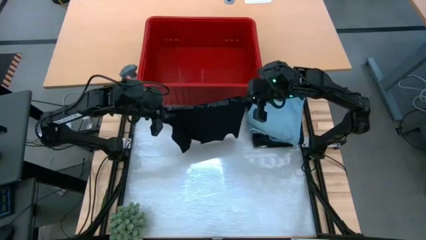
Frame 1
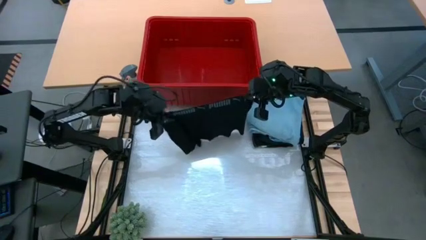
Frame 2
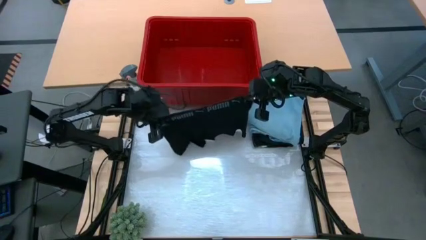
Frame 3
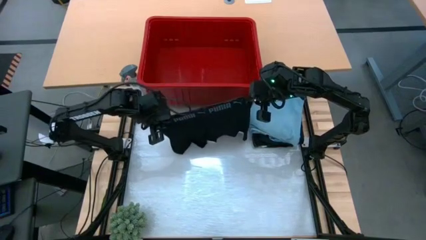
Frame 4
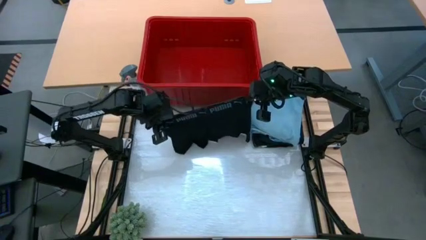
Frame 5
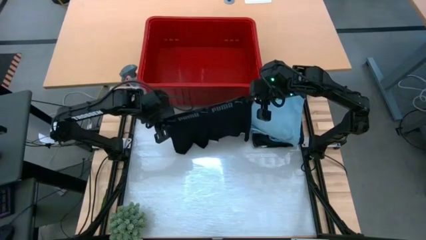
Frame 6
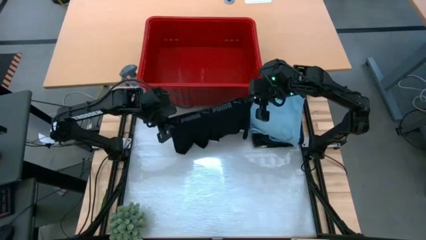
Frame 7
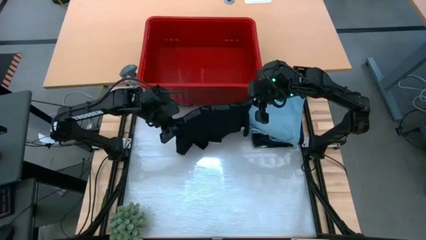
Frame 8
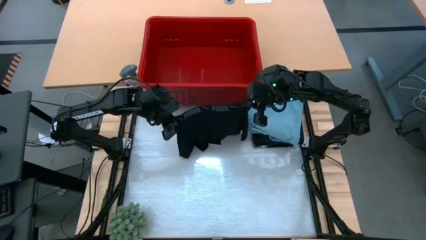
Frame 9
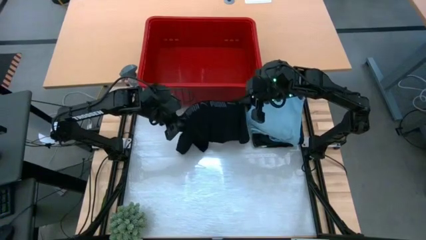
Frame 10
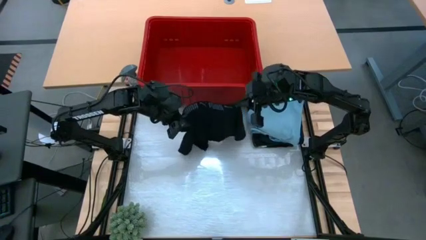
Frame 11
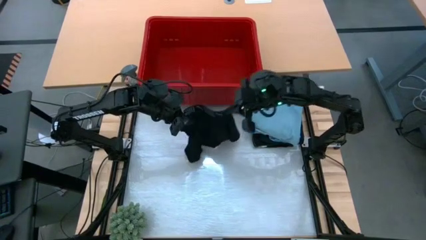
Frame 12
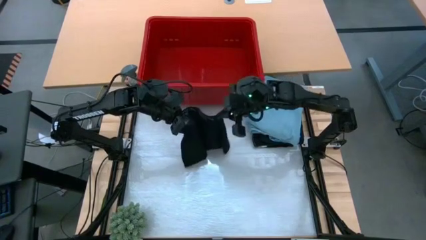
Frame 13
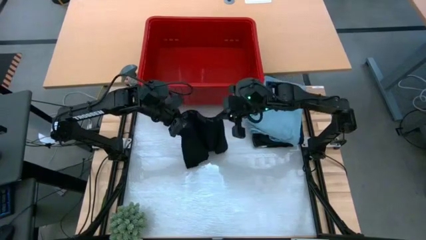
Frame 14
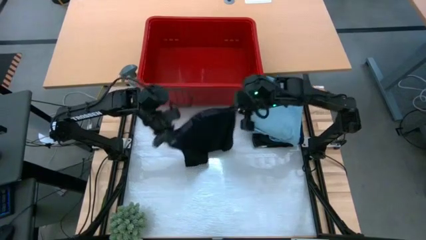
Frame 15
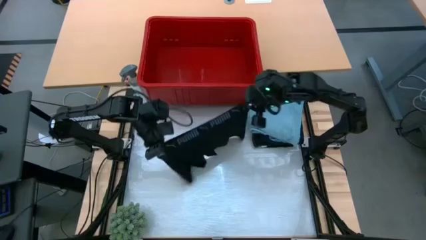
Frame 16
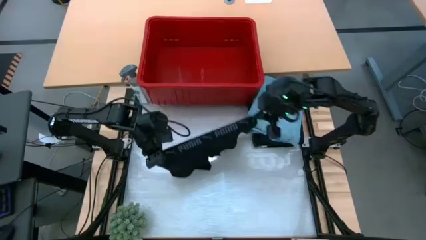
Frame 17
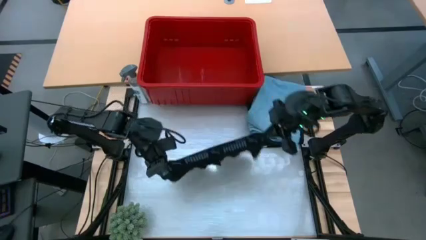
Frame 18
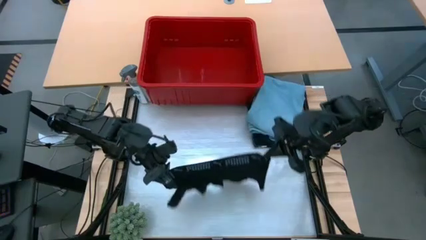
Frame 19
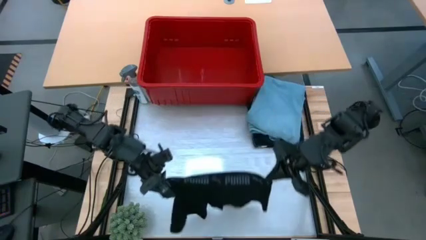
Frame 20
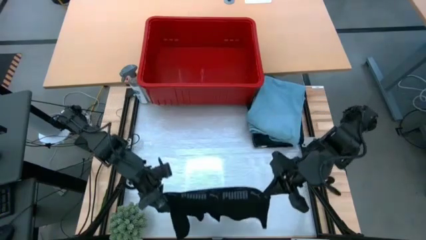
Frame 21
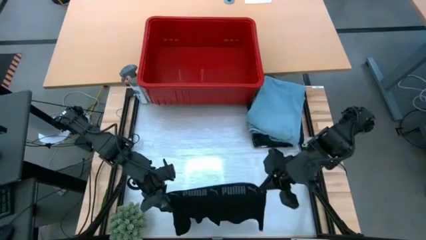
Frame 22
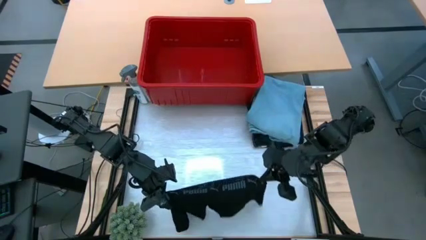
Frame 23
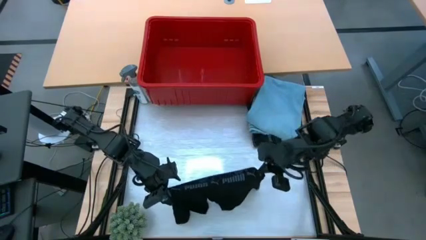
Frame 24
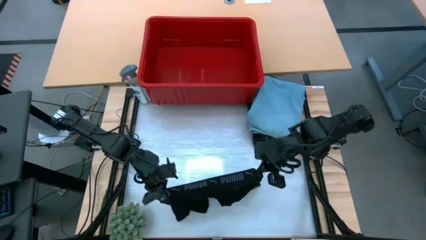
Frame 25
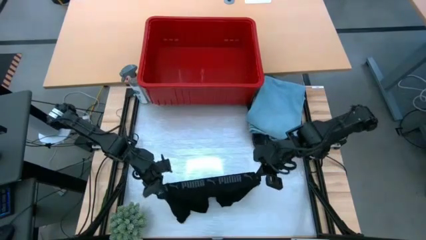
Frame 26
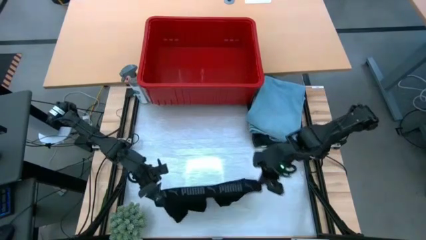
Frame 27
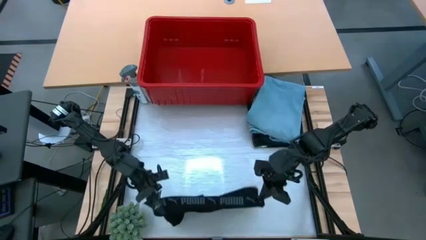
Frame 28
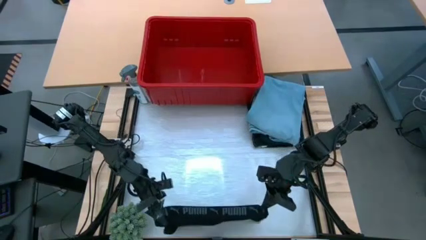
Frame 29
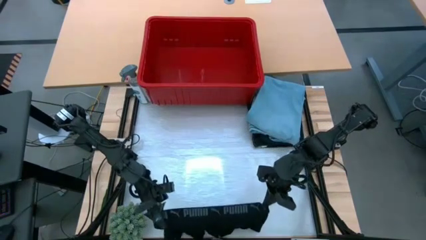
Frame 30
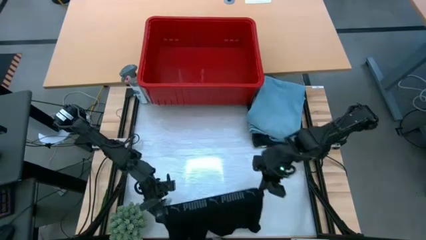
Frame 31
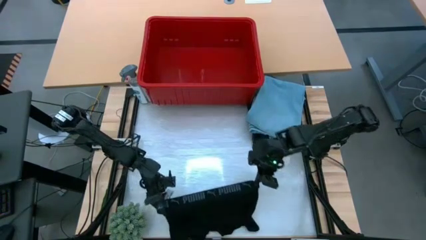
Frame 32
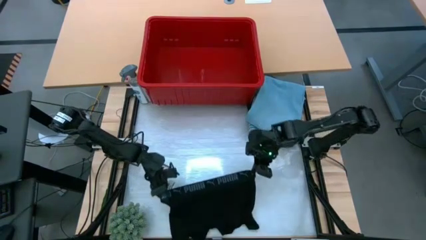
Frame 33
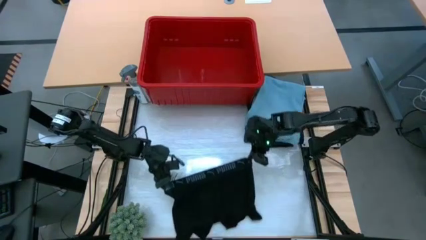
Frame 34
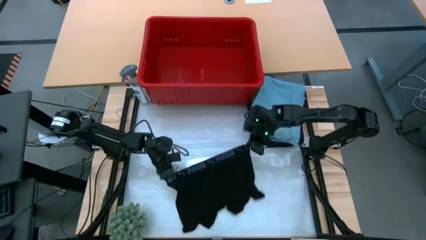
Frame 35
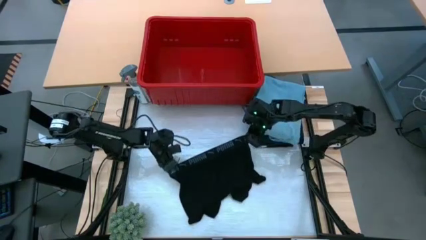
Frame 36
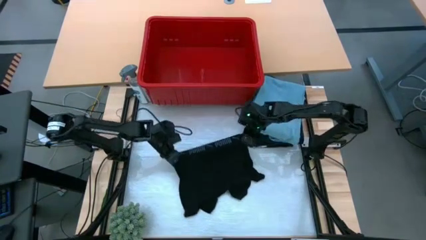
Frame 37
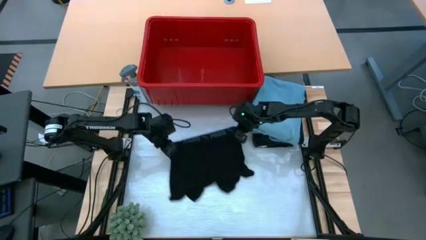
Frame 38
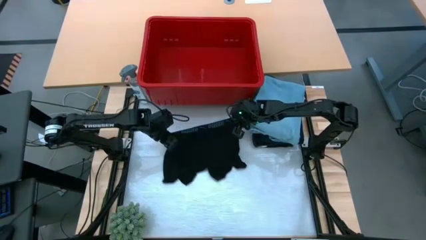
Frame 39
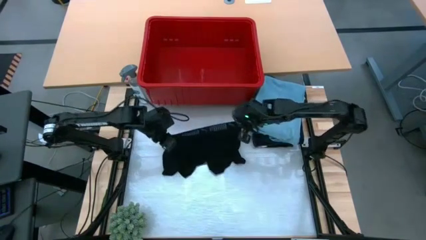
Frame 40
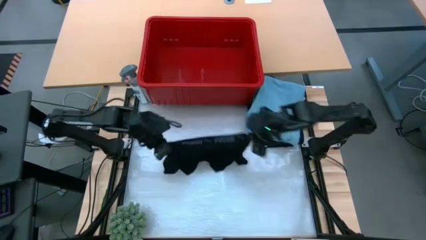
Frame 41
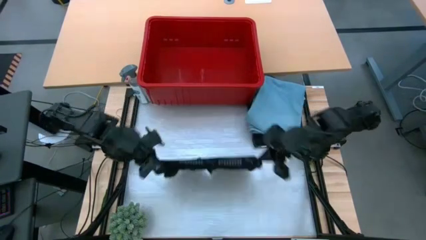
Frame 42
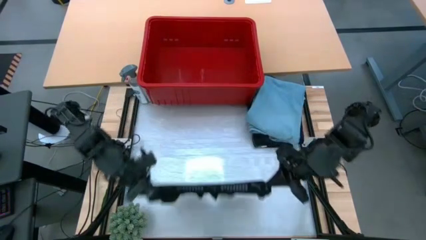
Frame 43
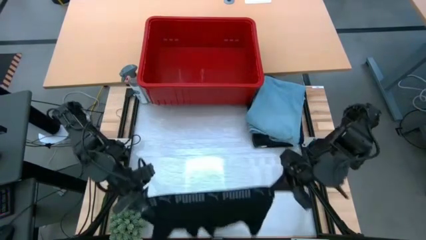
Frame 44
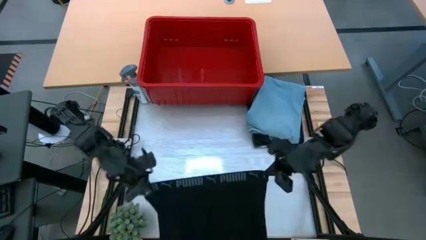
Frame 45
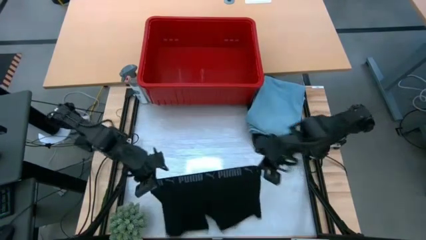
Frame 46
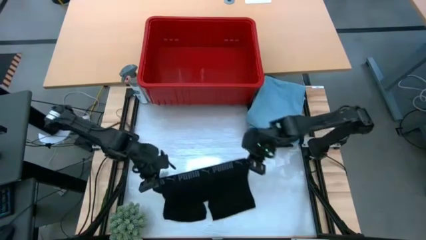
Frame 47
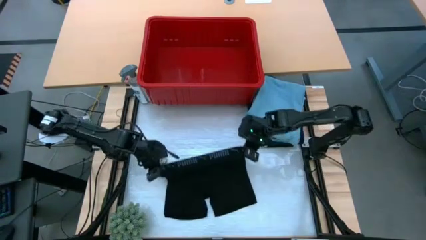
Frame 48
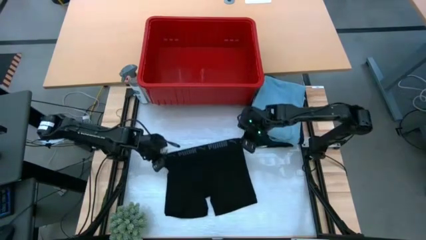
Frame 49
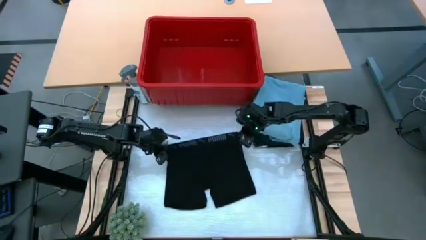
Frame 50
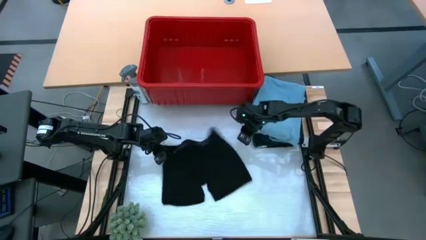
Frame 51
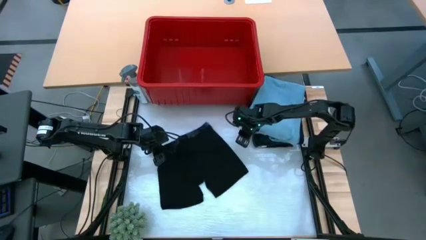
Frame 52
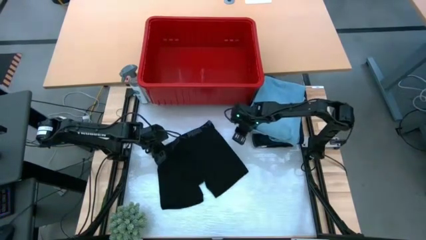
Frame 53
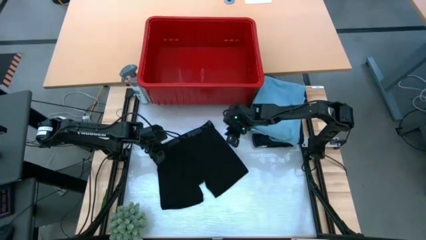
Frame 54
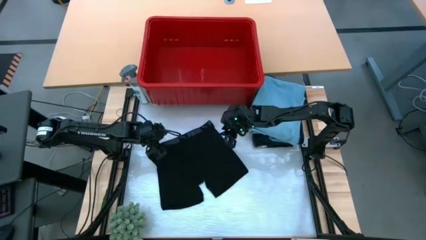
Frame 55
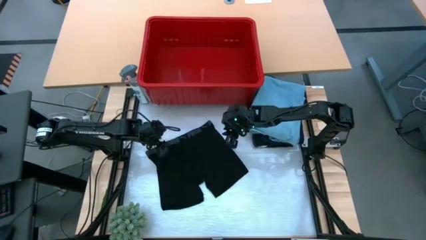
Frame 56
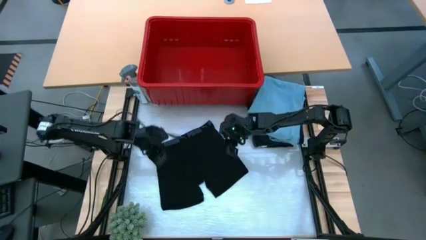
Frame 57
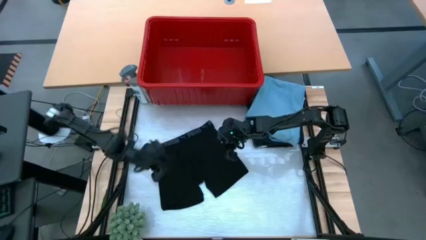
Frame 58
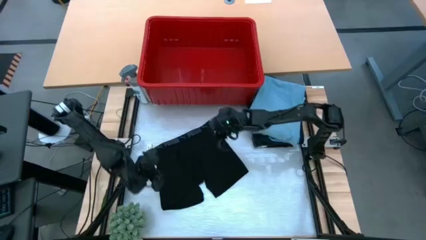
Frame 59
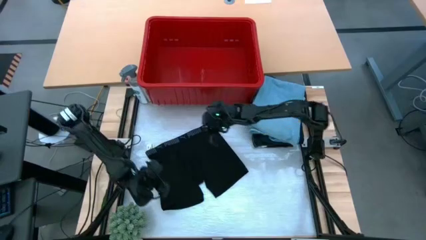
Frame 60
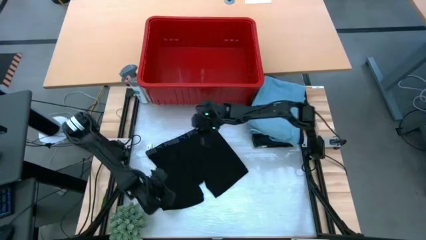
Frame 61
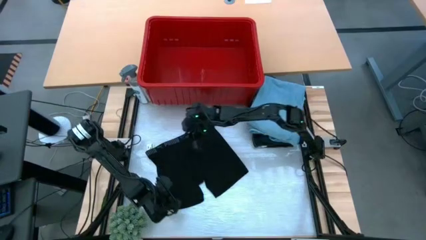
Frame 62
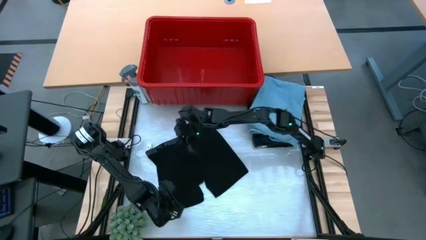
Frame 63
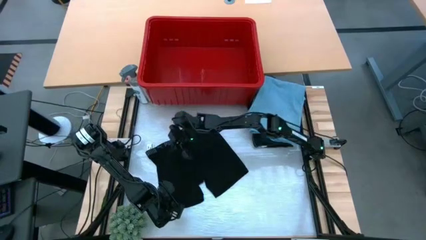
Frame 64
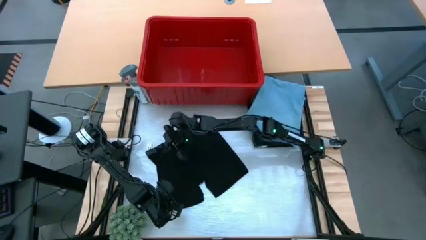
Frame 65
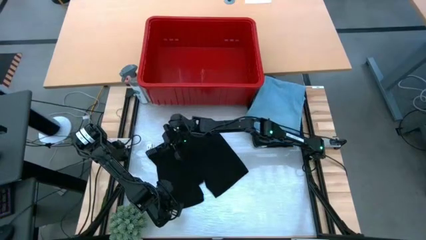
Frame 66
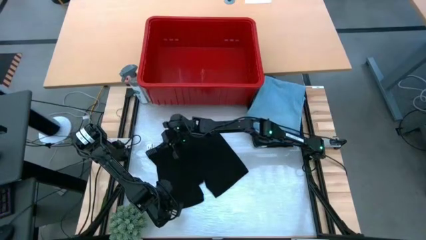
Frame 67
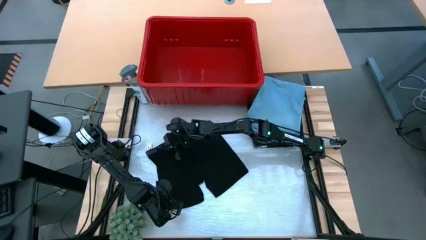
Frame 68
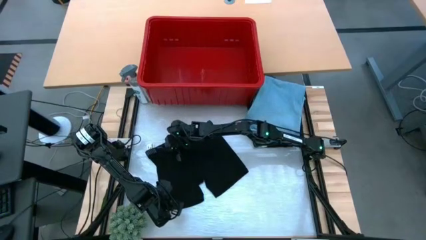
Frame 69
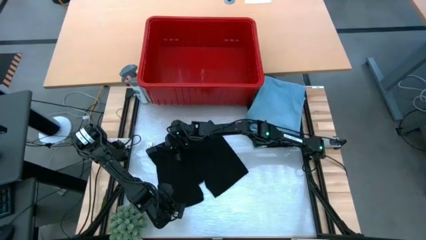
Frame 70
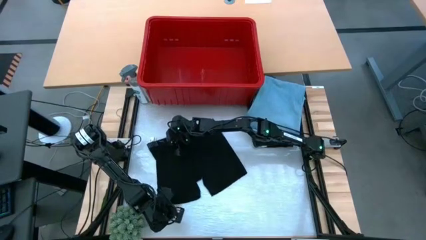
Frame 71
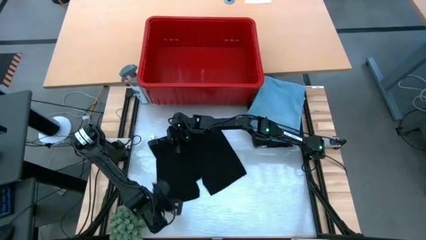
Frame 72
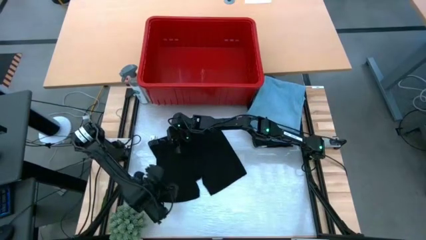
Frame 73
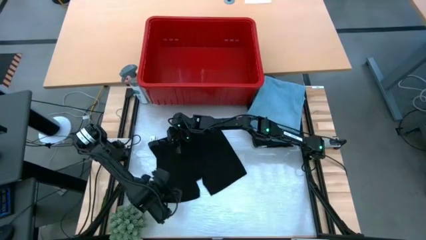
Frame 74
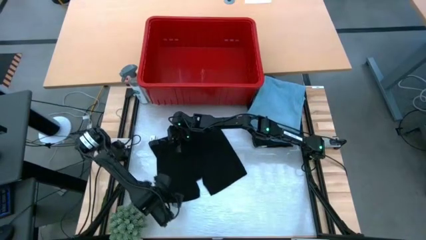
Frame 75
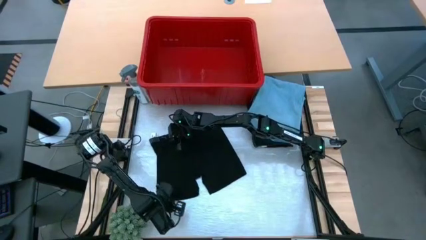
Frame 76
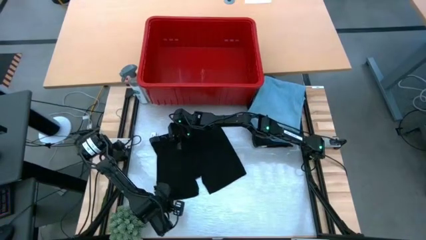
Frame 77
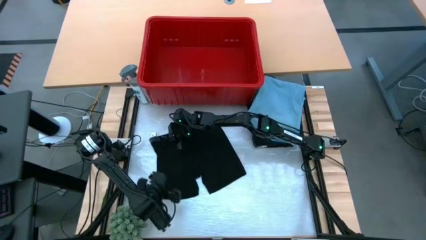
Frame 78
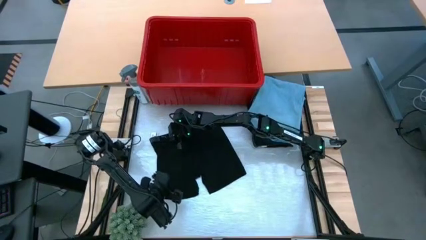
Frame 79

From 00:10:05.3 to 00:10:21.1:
Task: Fold Laundry from Bin
Fold the black boxer short
